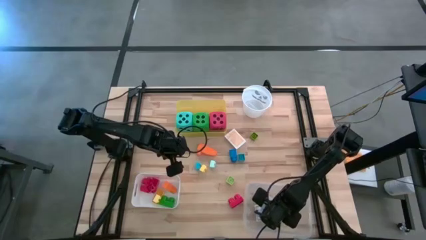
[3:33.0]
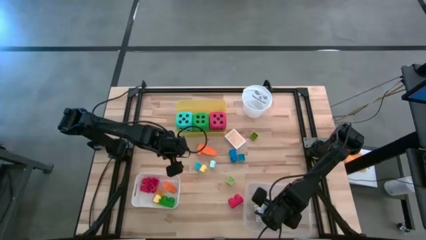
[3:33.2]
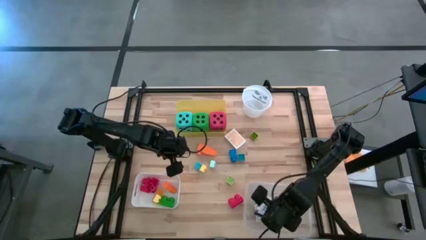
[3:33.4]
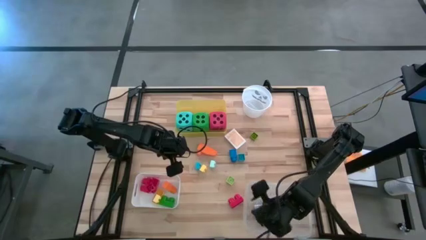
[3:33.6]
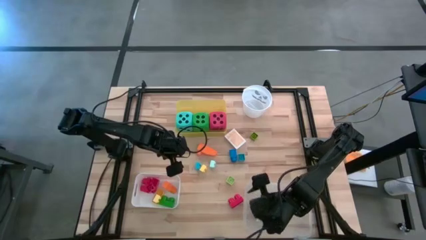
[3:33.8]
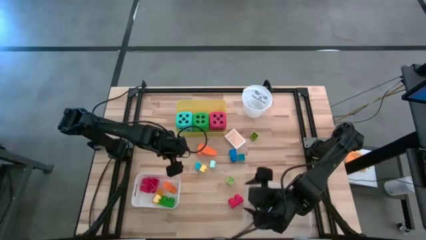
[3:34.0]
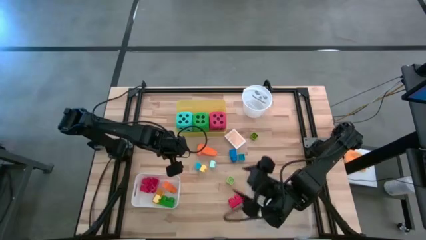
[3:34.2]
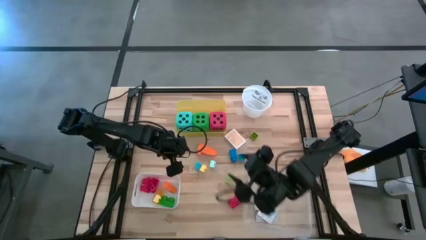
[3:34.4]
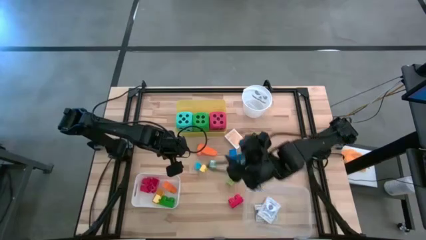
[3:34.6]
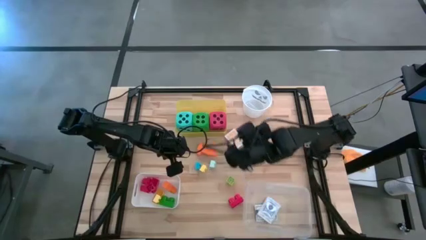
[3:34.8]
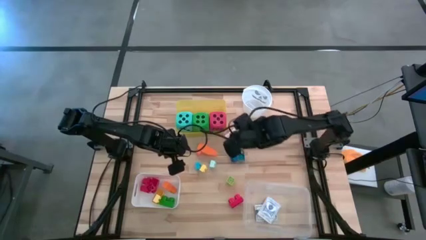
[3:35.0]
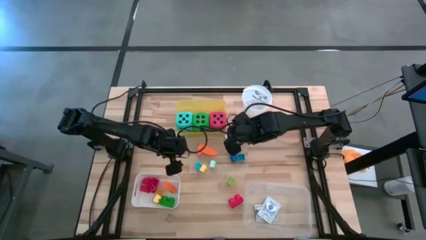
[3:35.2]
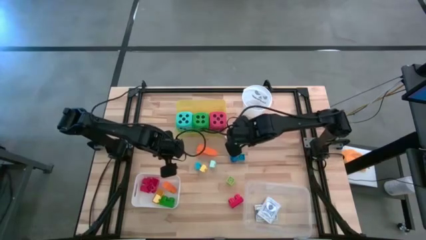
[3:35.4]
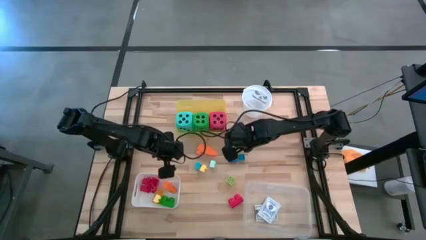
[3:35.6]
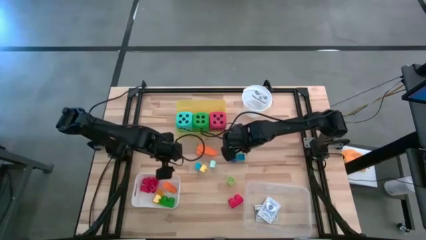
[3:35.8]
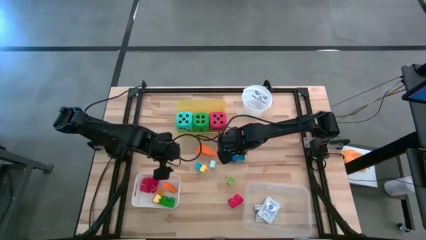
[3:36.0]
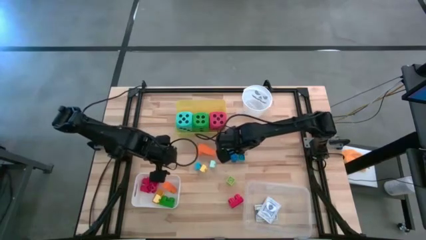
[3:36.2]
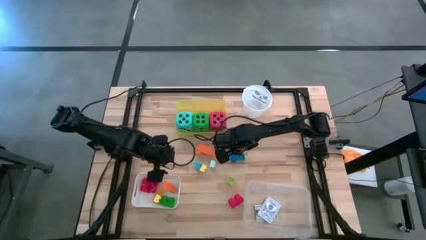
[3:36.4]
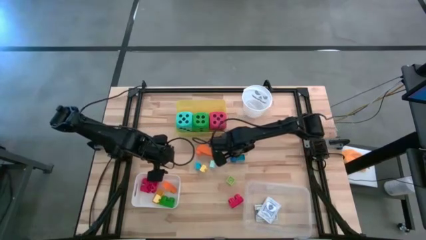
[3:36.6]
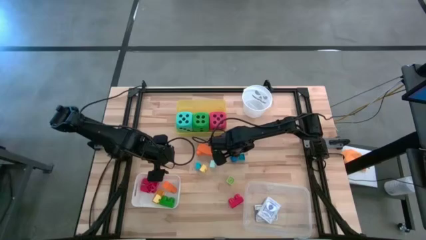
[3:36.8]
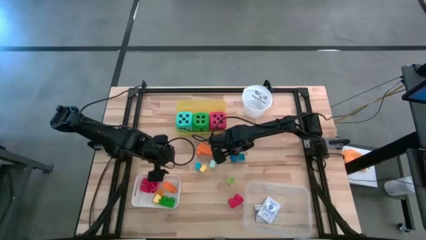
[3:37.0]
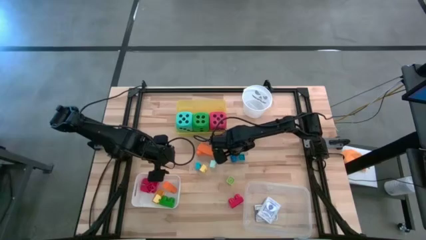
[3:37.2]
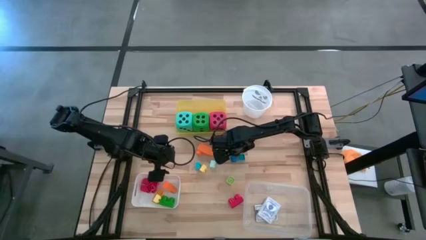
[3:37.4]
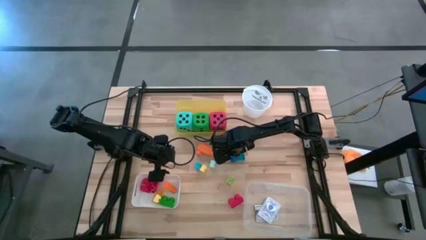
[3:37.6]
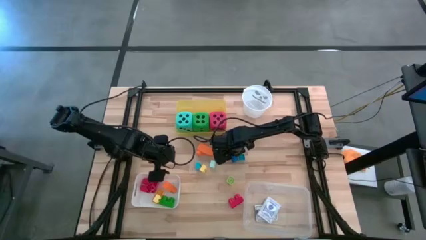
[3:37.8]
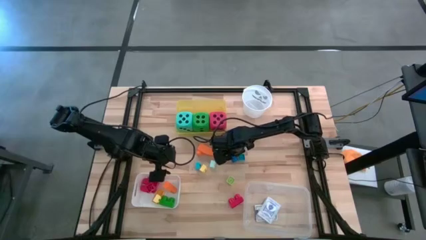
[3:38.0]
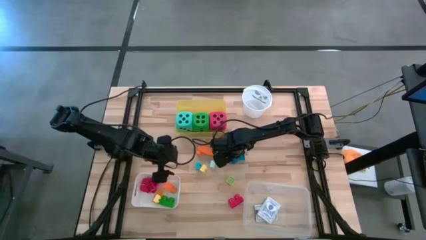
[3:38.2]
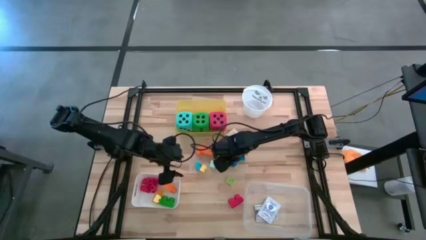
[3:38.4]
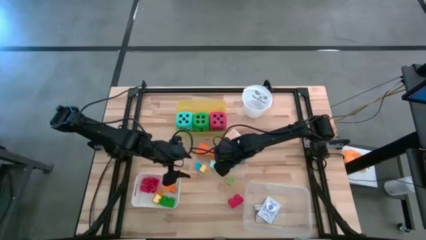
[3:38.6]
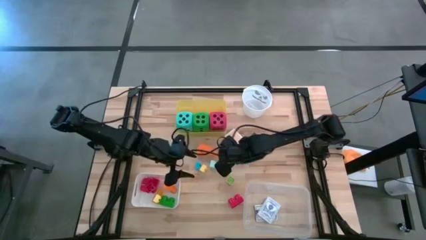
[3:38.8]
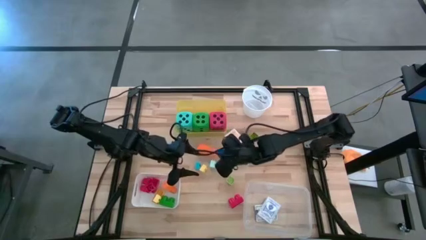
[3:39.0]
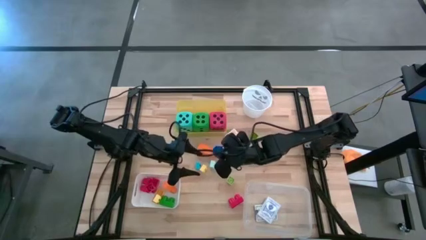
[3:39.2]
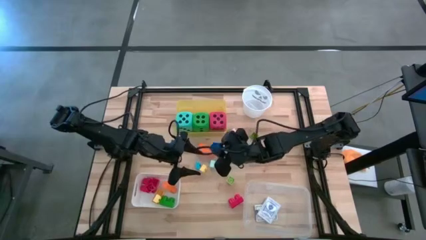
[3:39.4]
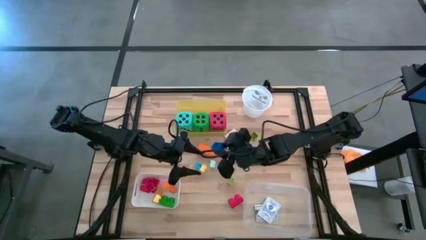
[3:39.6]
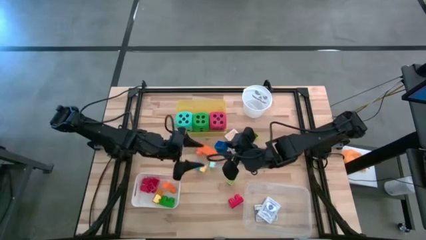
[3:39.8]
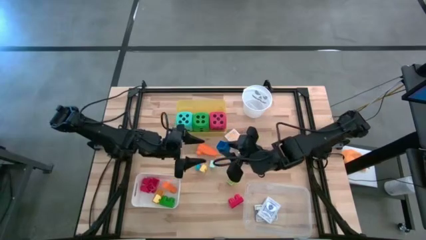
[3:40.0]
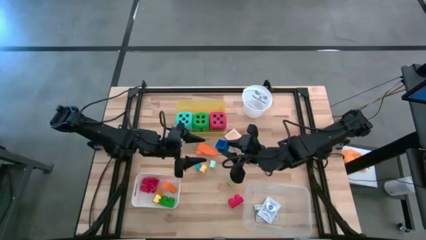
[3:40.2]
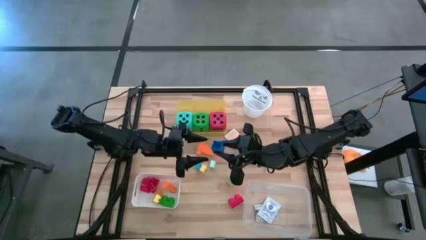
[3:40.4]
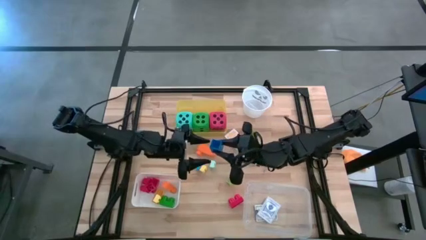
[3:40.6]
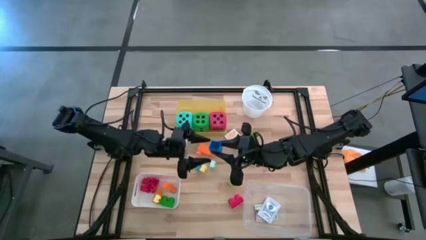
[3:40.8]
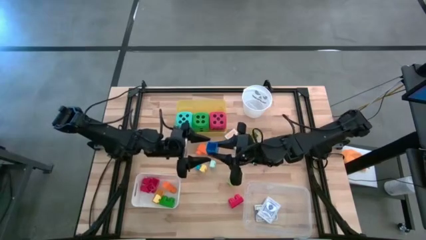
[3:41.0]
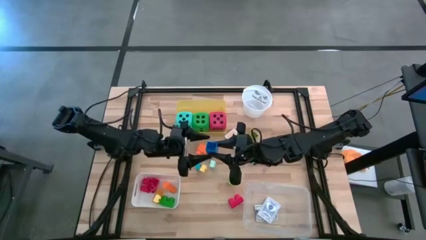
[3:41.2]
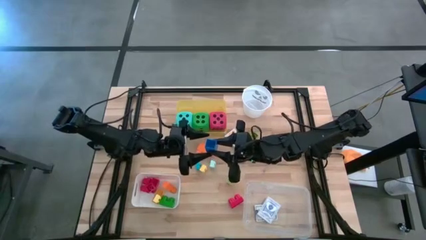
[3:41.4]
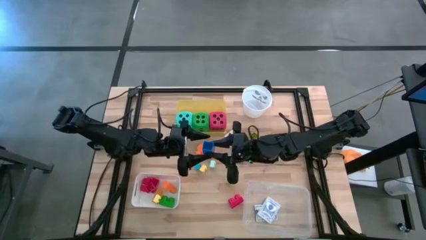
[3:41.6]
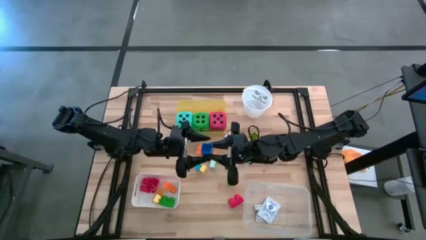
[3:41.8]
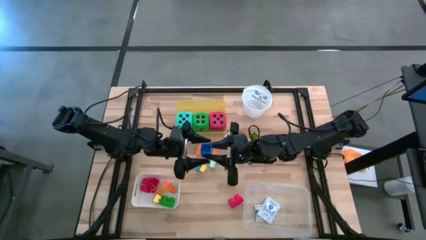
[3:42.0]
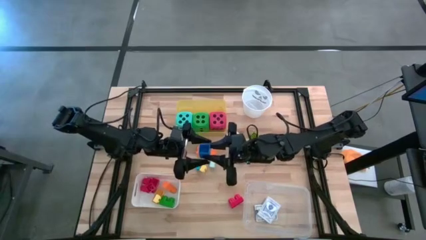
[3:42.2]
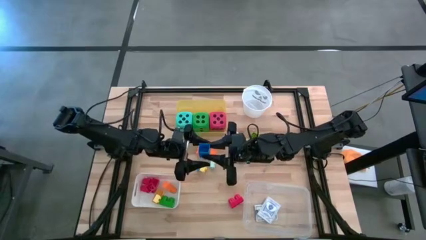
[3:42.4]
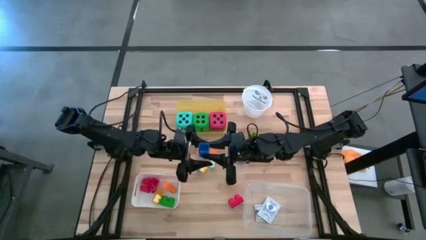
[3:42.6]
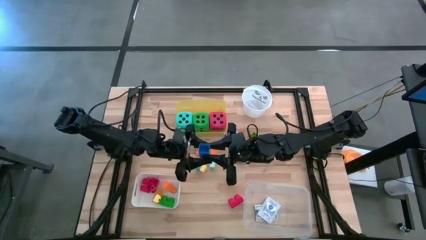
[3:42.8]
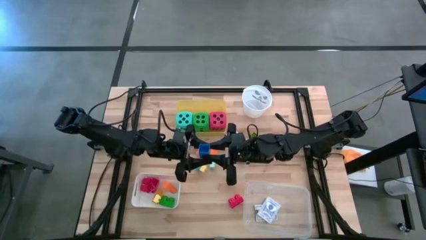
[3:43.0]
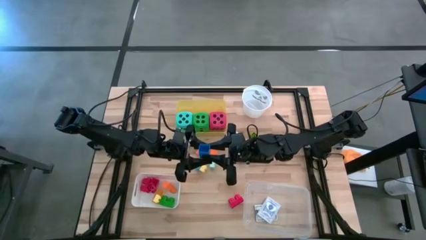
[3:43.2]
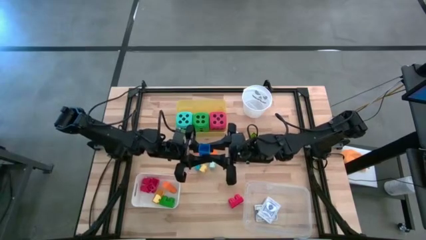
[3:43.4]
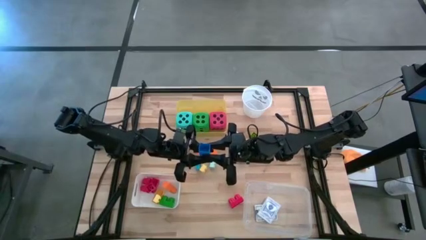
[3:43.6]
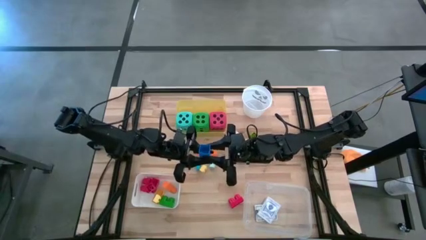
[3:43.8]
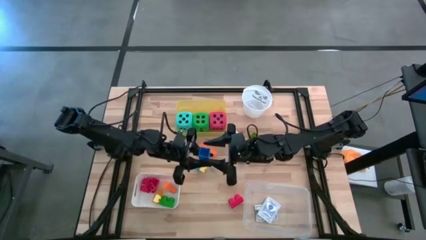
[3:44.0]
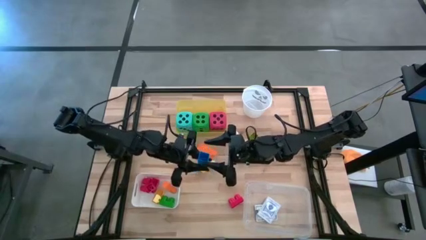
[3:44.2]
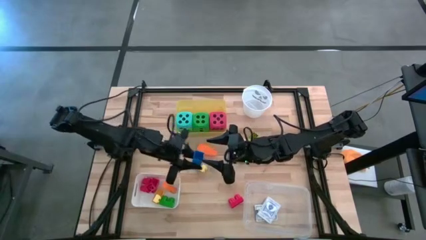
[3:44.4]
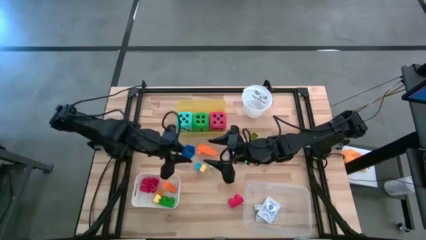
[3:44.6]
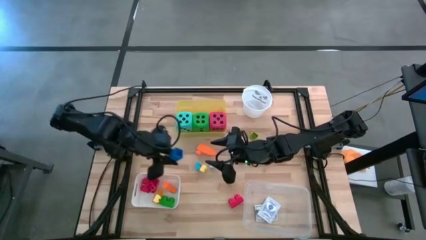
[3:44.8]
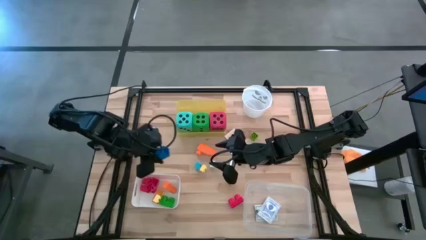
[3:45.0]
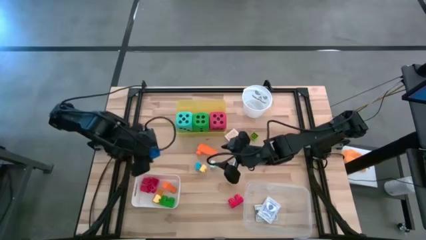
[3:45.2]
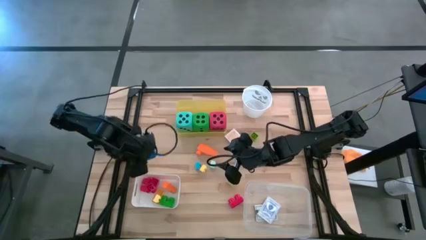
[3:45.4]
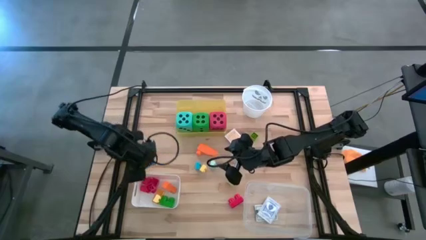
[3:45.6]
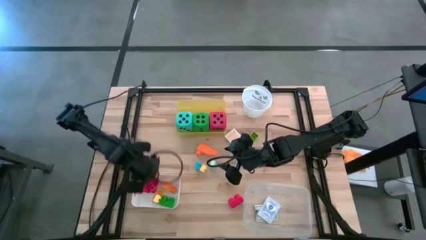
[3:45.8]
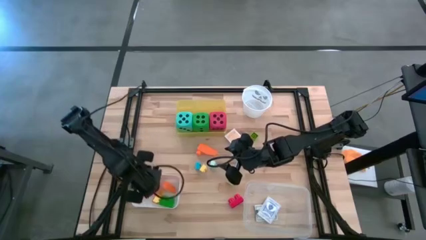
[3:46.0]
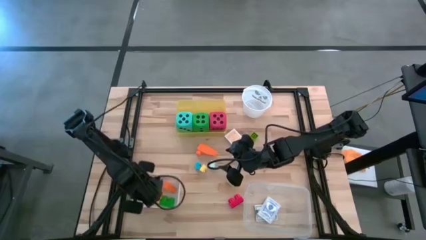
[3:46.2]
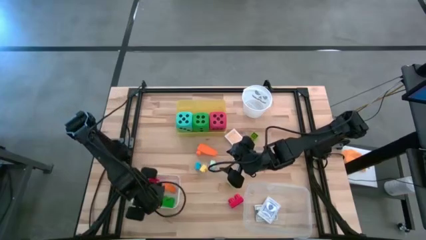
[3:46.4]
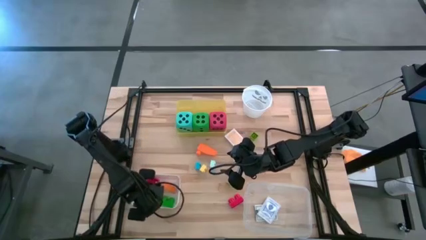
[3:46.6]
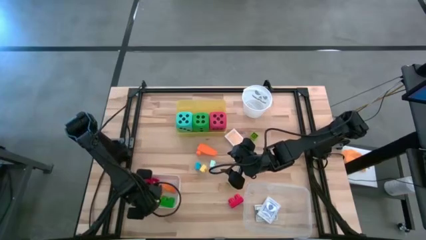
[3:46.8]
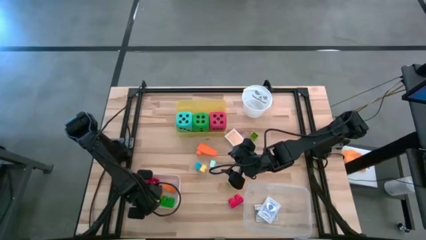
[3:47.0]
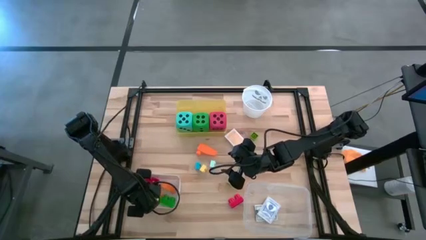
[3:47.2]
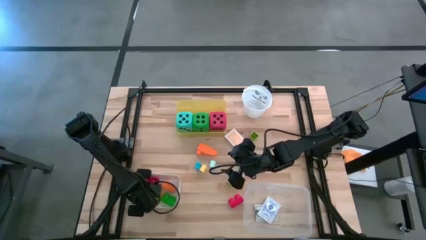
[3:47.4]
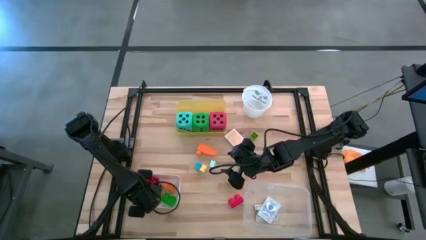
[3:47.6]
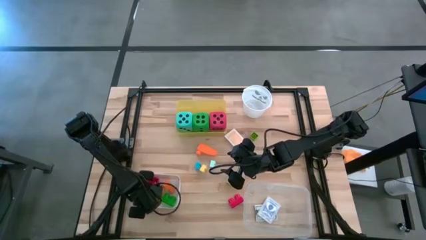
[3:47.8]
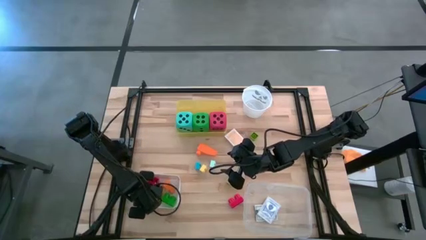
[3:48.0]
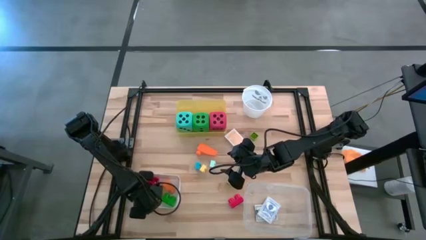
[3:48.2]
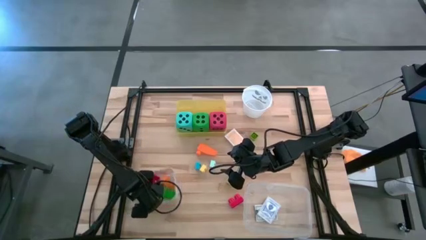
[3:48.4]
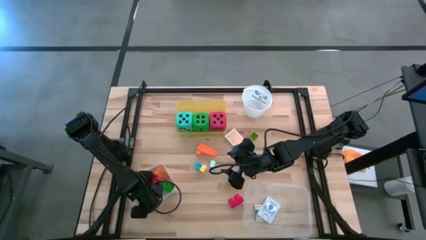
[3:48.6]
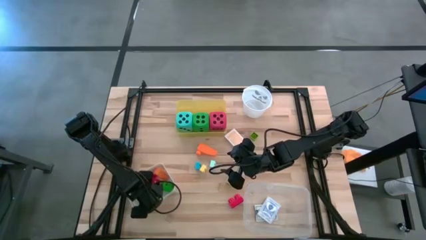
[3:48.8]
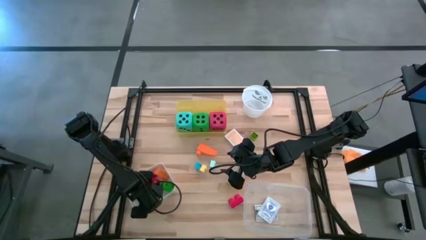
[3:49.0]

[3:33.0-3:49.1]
Task: Pick & Place Toys
Put the blue game piece into the white bin
